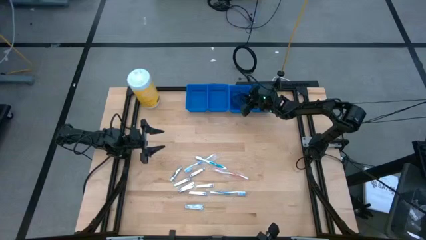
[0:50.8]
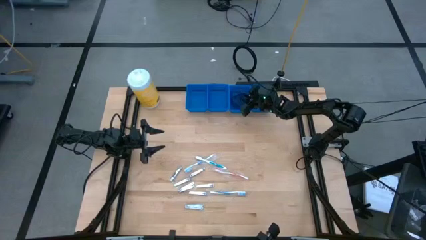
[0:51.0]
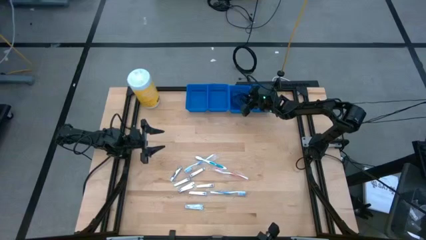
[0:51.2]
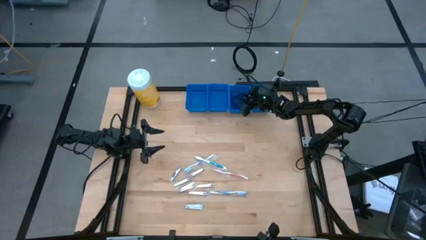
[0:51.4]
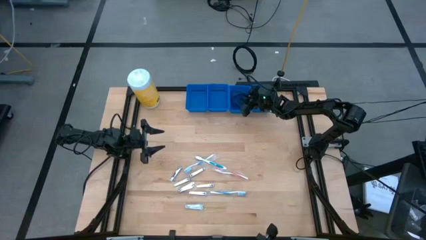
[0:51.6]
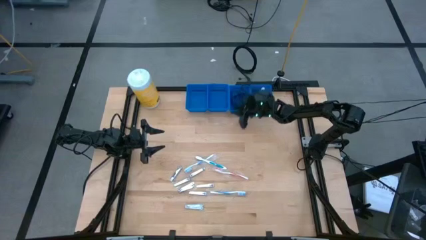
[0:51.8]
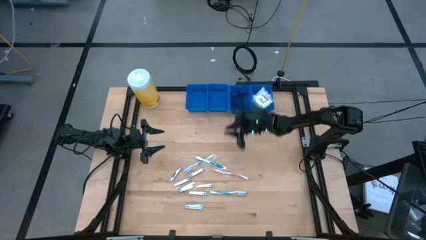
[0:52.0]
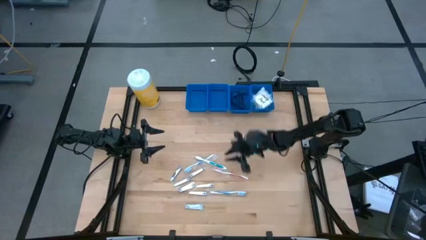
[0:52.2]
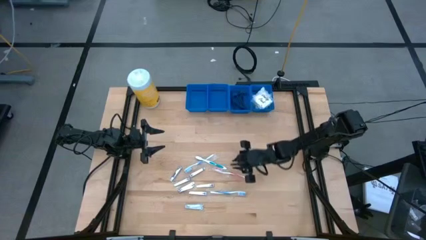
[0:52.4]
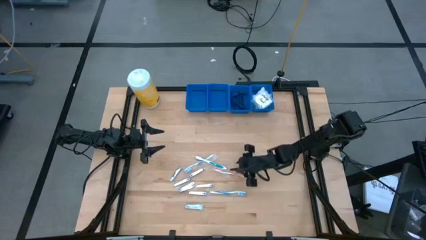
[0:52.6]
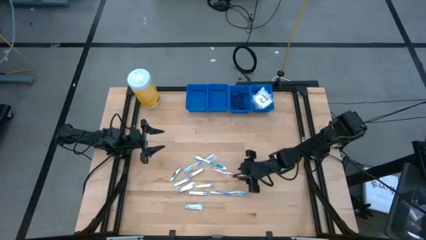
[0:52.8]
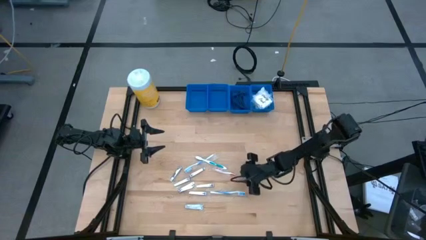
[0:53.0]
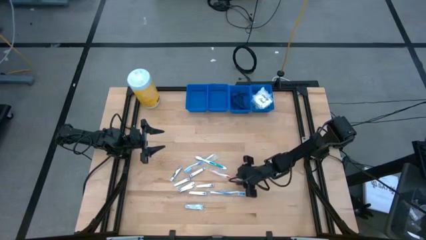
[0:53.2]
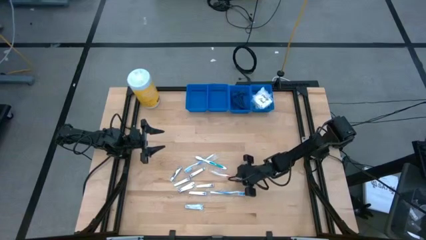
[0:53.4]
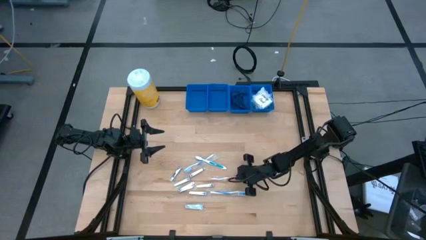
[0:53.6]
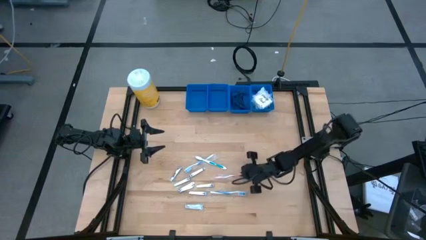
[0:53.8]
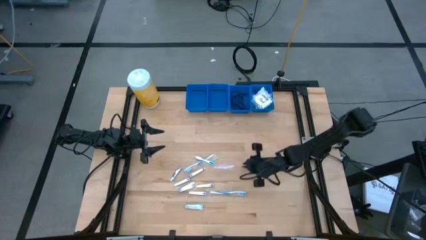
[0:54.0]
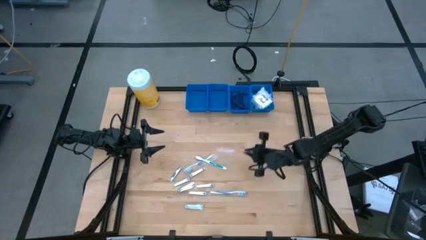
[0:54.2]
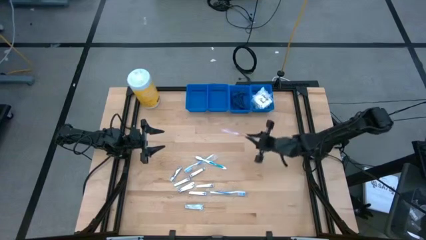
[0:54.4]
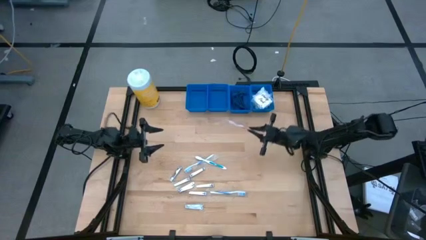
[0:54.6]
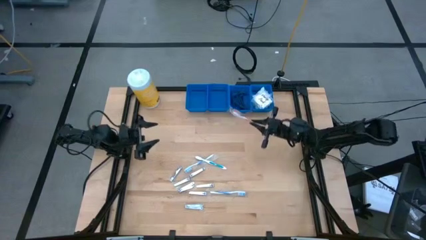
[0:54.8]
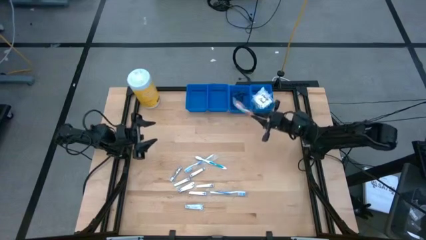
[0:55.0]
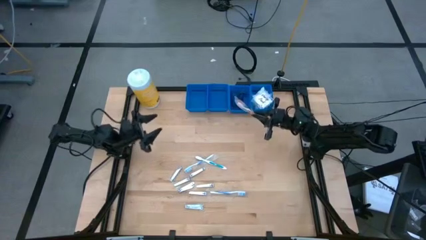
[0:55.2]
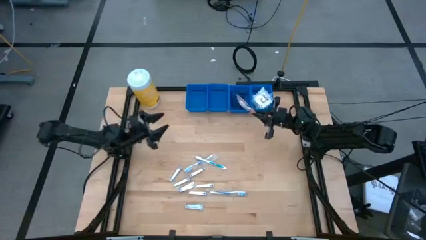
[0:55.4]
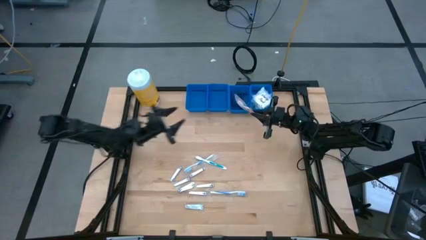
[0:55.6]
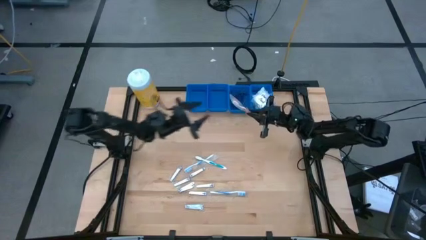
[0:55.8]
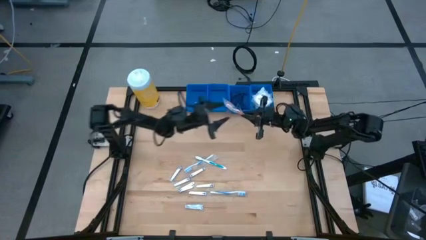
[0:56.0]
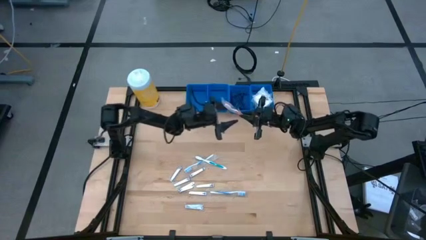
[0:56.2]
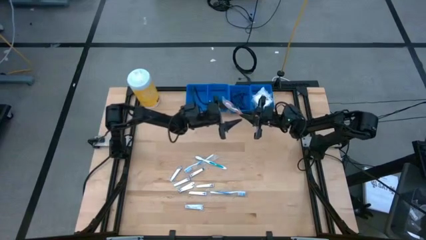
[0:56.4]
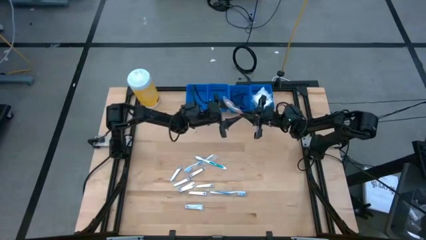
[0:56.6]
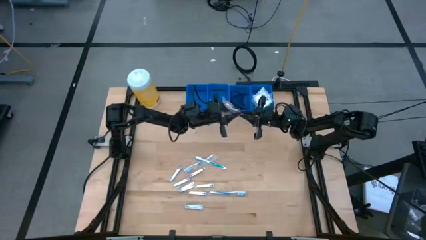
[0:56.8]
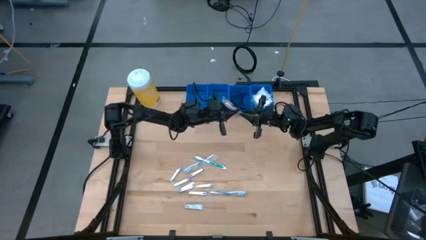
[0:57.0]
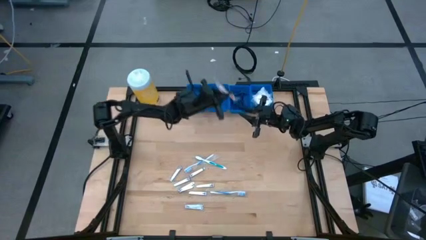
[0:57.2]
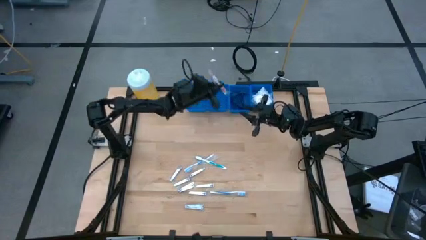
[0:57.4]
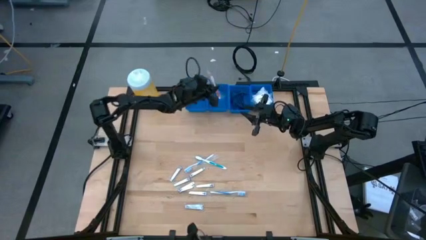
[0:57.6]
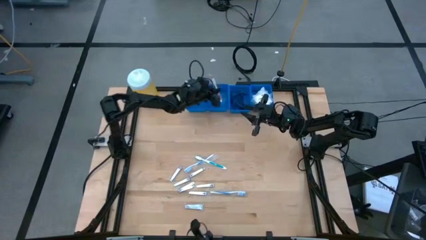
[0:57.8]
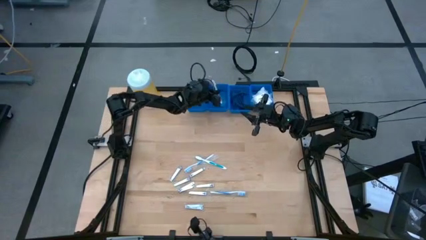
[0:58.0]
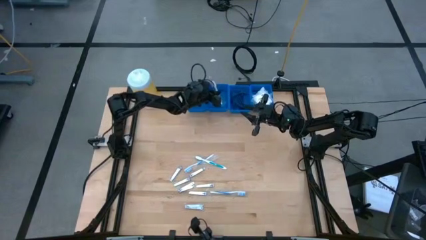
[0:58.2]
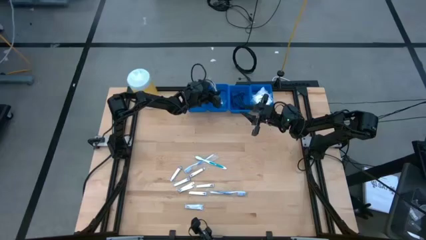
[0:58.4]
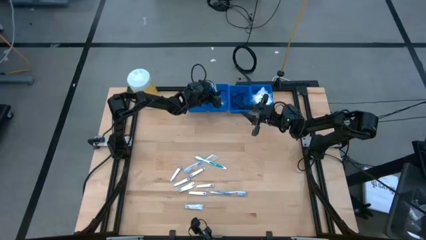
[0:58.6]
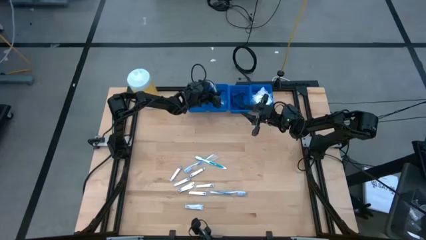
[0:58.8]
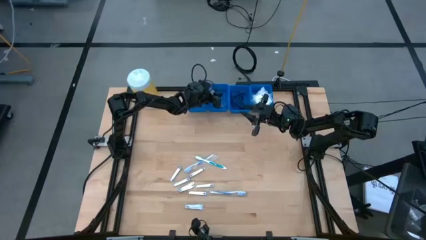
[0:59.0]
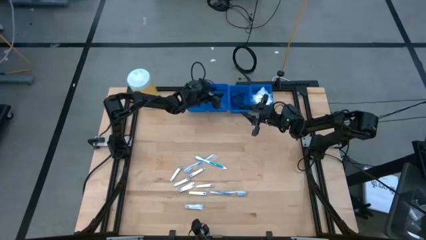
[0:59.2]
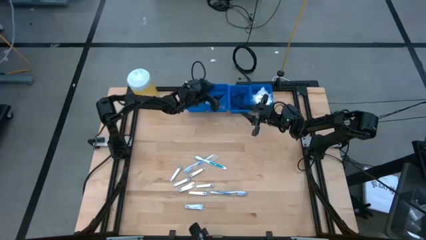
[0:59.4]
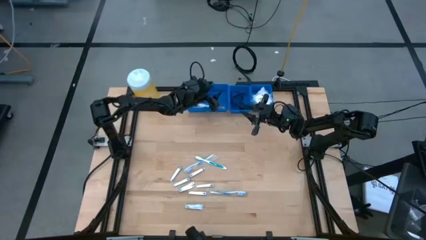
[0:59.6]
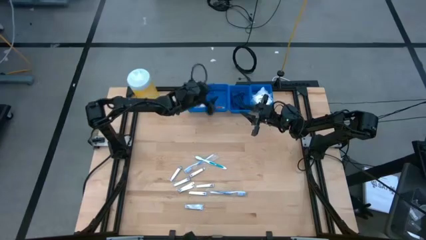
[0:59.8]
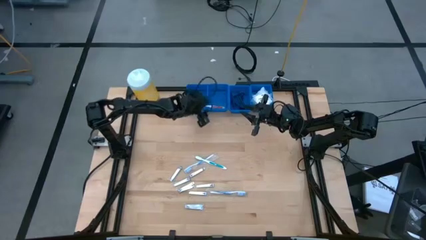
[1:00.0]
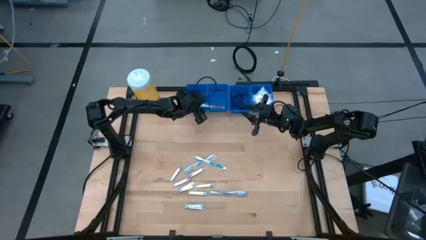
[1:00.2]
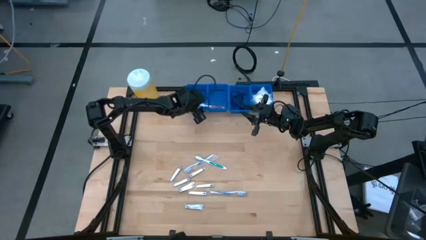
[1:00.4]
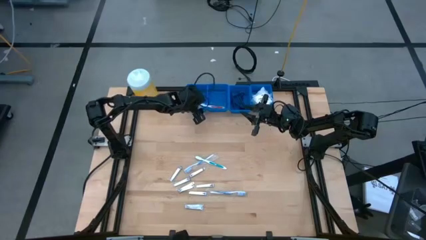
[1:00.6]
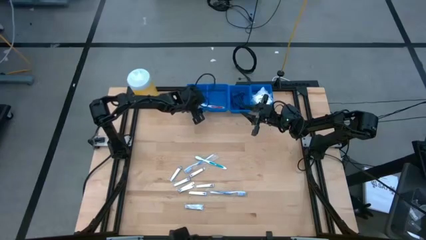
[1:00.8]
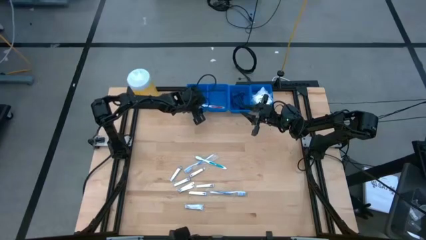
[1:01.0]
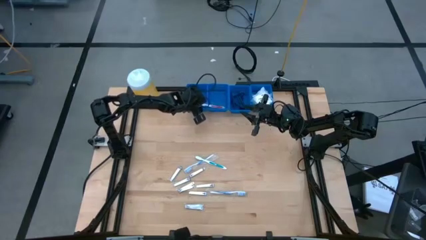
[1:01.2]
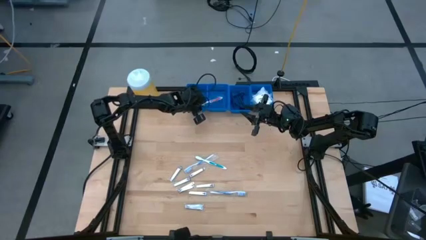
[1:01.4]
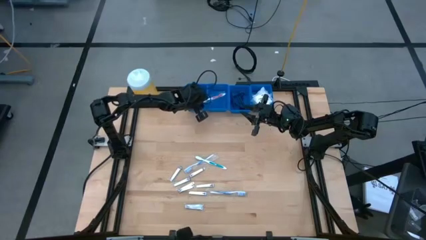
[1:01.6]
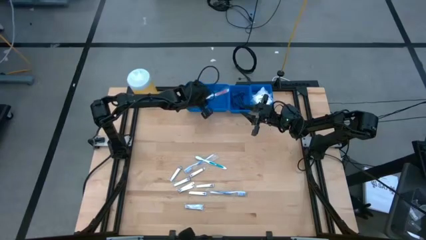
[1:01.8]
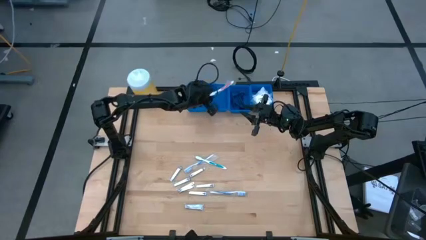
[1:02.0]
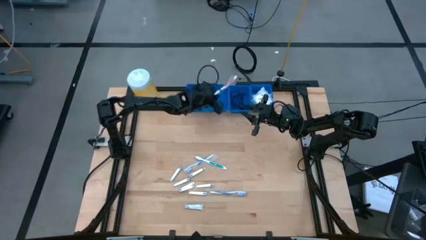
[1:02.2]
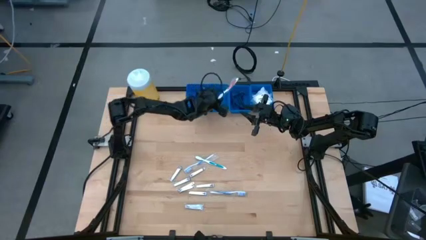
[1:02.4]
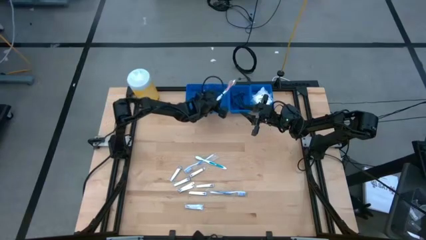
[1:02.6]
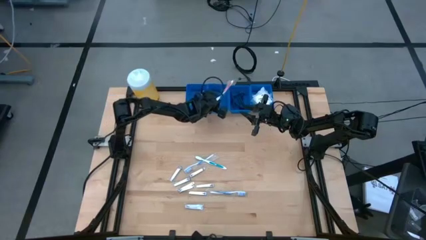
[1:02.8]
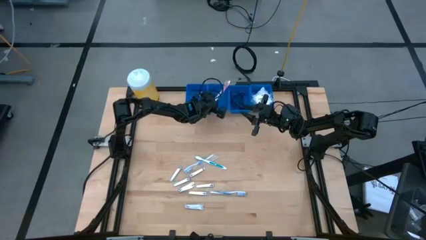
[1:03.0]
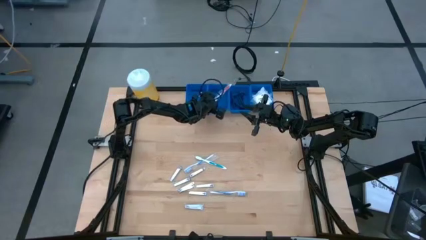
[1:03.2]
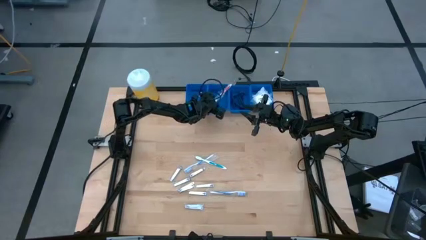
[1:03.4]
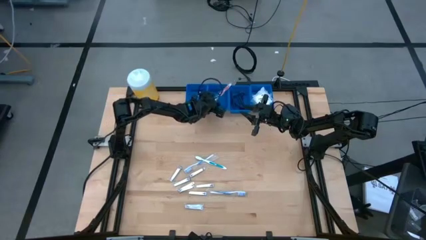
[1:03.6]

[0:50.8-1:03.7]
Task: Pick & Place Travel size toiletries
Put the orange toothbrush into the middle left blue basket

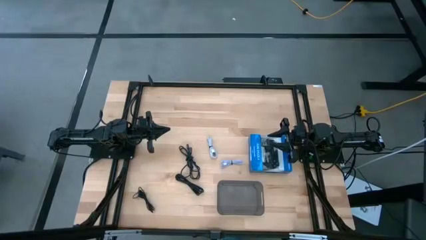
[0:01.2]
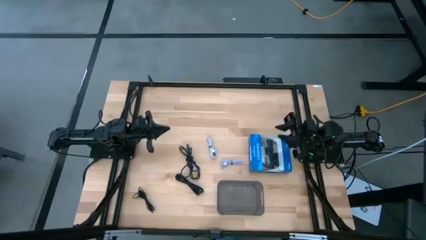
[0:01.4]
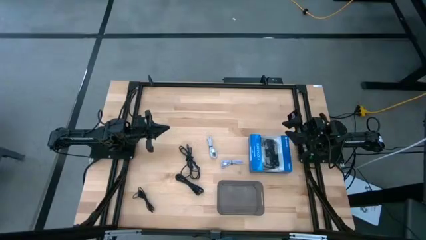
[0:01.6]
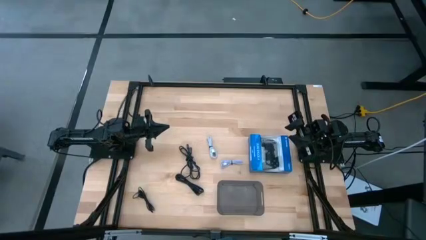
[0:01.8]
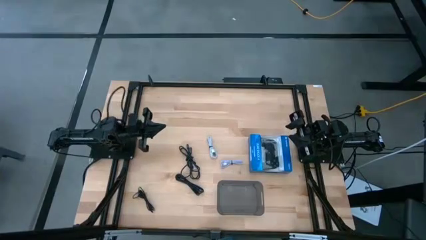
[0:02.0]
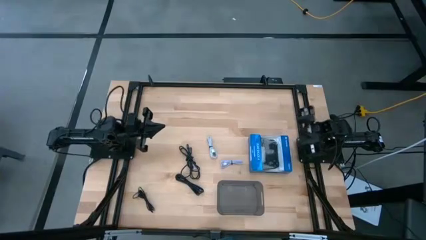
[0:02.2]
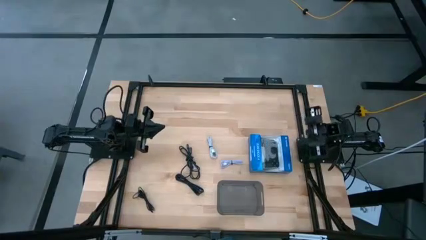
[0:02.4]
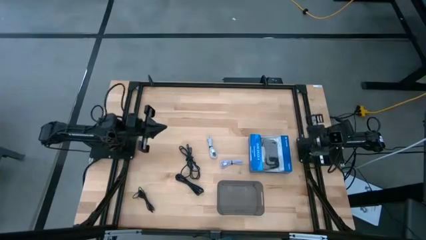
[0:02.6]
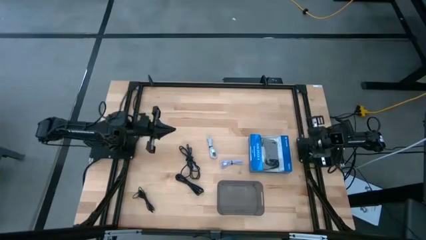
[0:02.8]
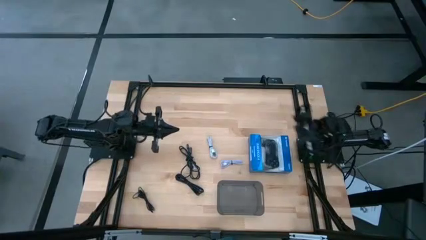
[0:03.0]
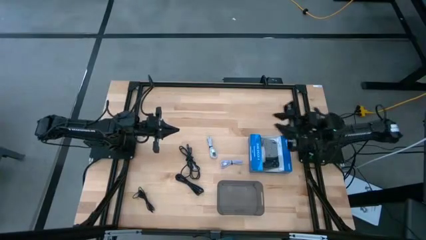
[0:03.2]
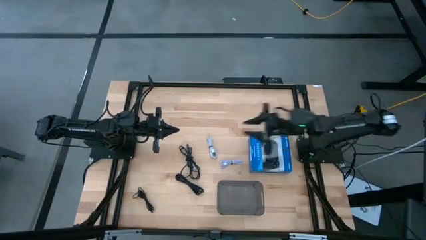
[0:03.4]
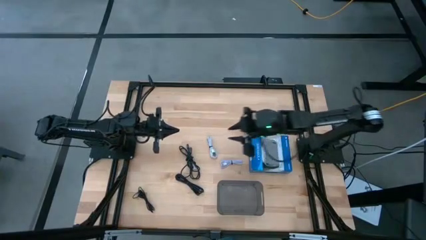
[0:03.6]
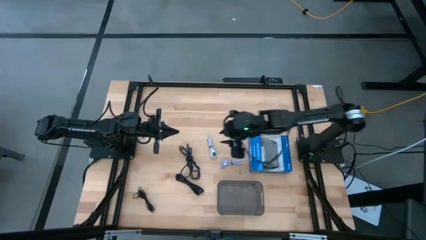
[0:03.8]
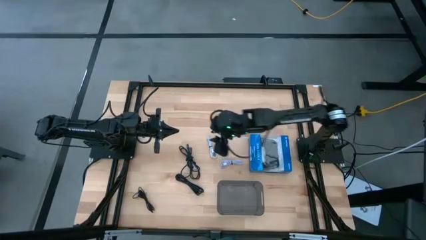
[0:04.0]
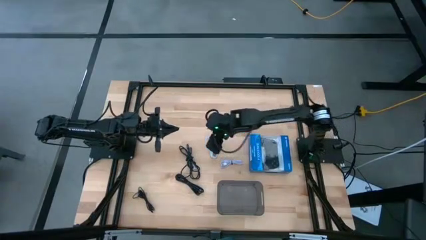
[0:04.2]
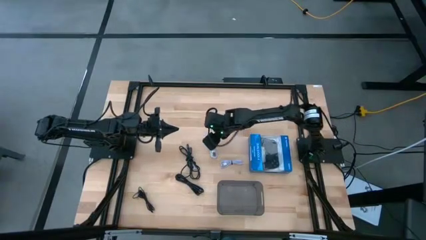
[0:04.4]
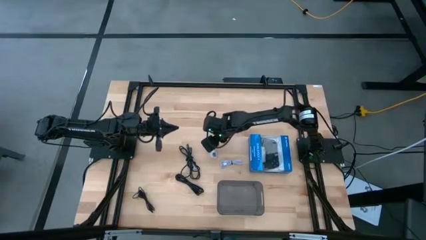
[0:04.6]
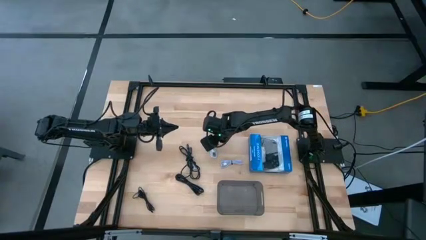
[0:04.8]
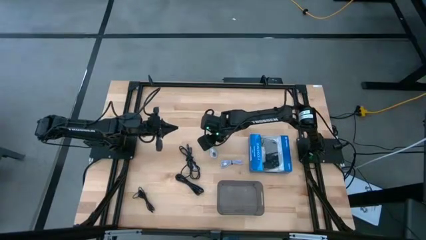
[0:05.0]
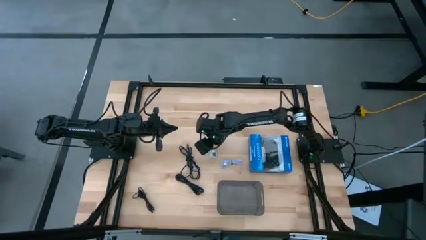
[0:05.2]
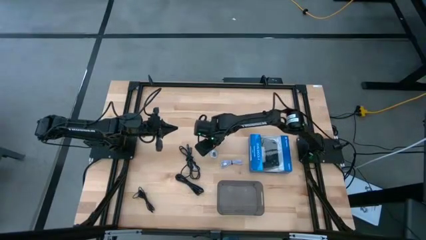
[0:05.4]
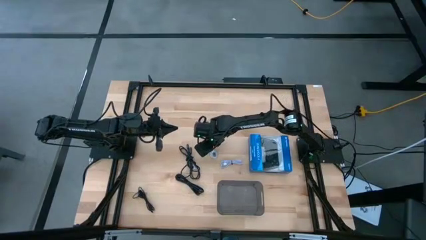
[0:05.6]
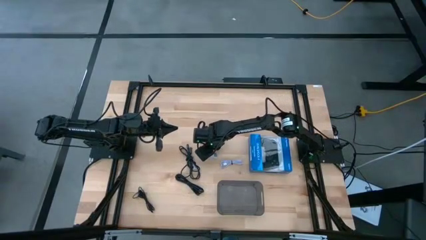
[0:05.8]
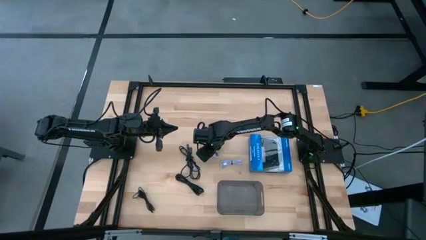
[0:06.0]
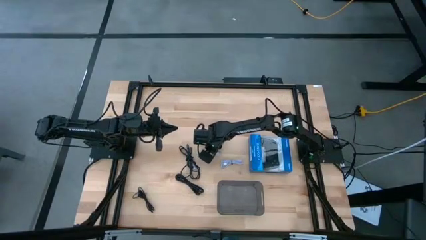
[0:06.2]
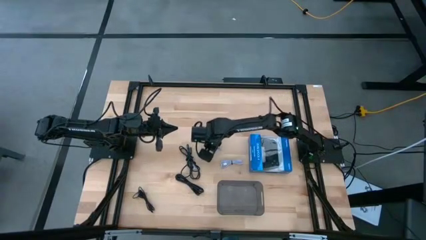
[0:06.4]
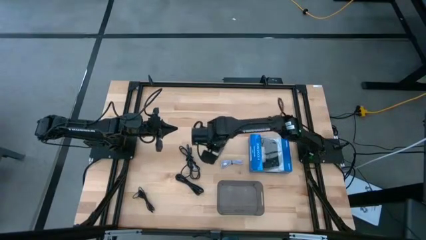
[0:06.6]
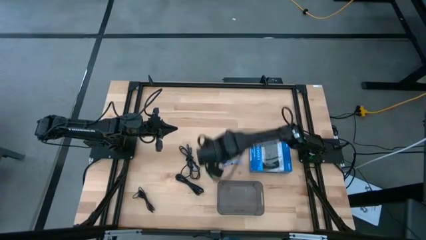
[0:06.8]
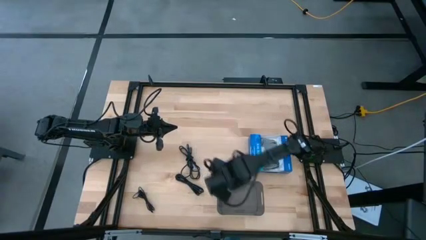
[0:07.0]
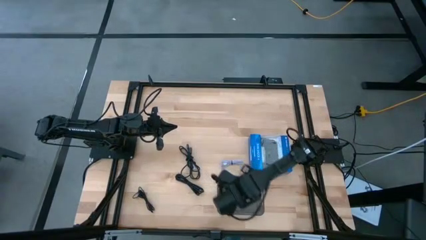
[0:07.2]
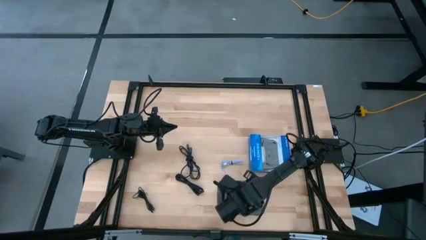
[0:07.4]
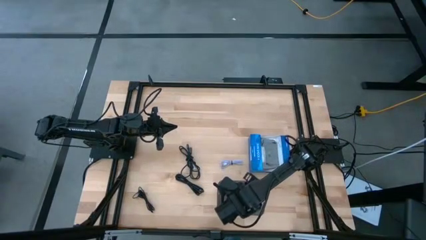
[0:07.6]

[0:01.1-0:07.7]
Task: Pick and place USB-C Cables
Put the white charger cable into the black bin
